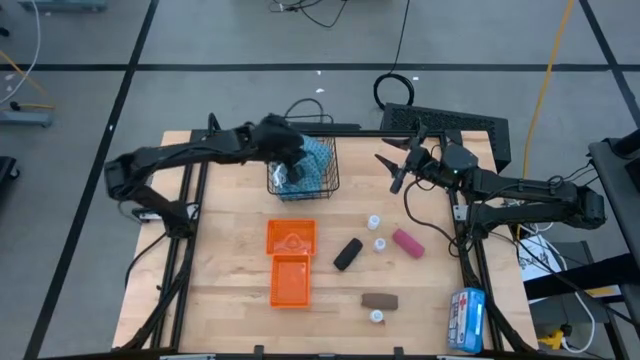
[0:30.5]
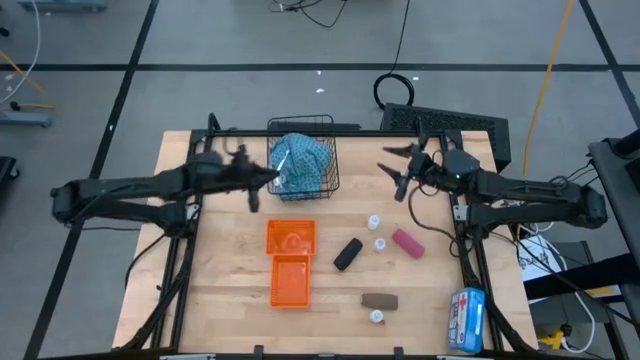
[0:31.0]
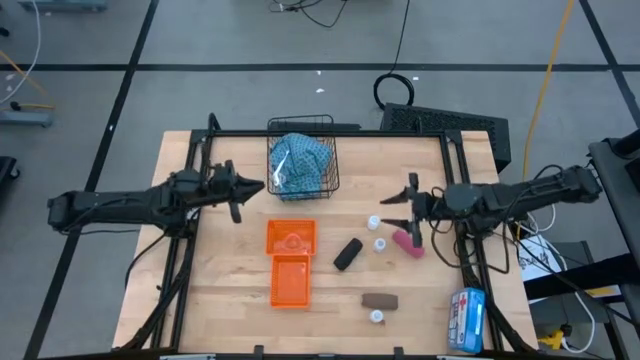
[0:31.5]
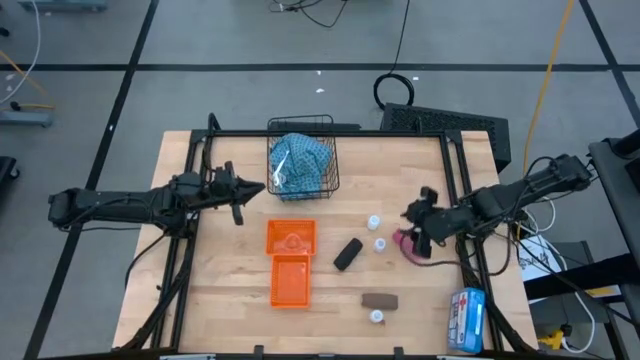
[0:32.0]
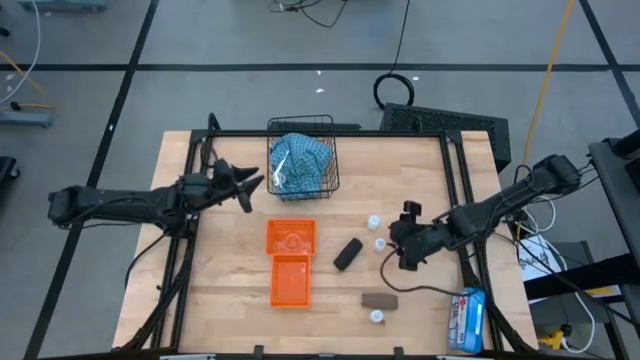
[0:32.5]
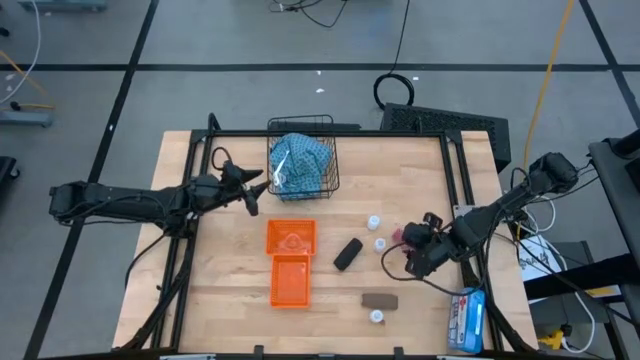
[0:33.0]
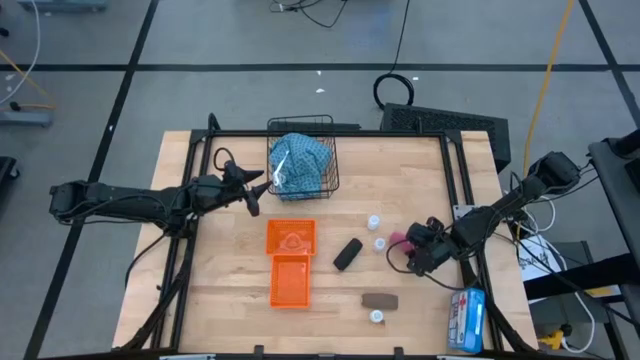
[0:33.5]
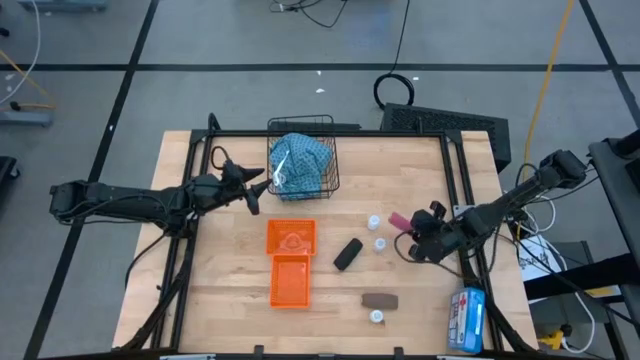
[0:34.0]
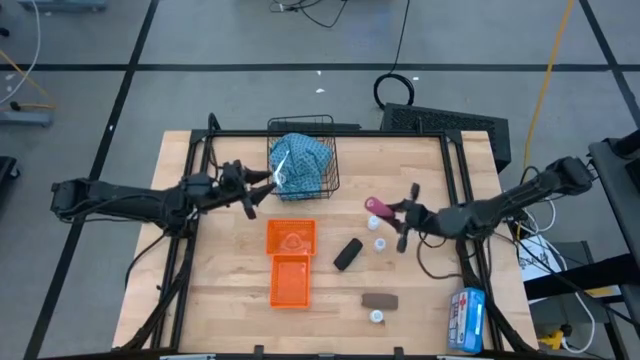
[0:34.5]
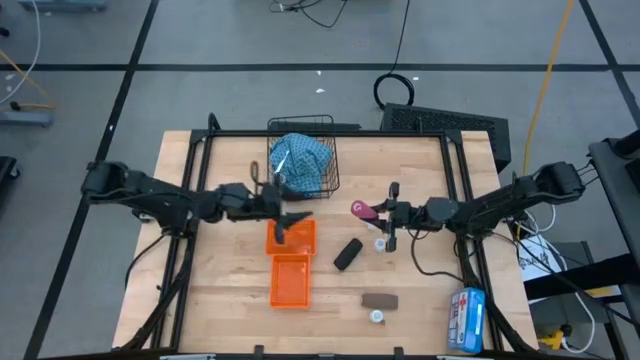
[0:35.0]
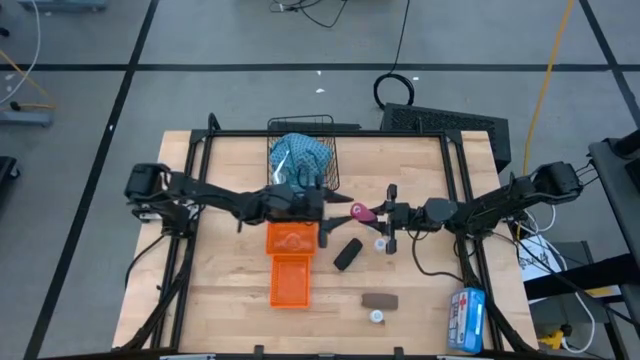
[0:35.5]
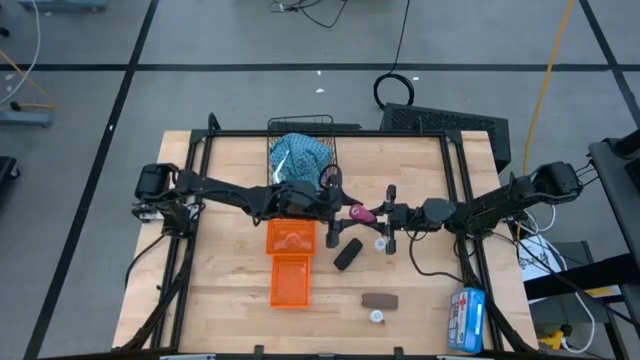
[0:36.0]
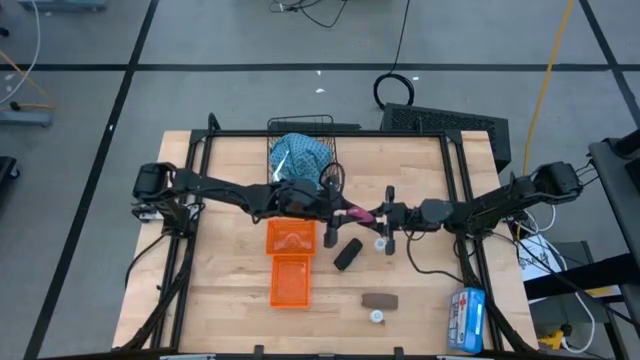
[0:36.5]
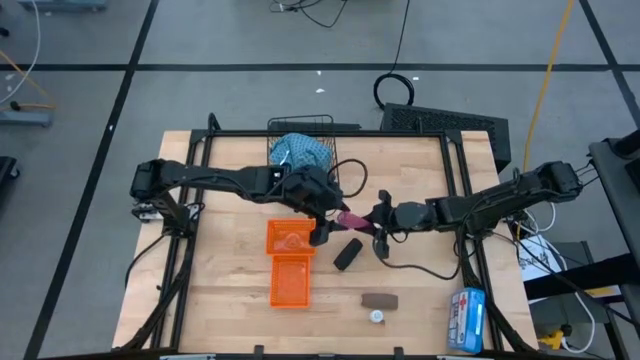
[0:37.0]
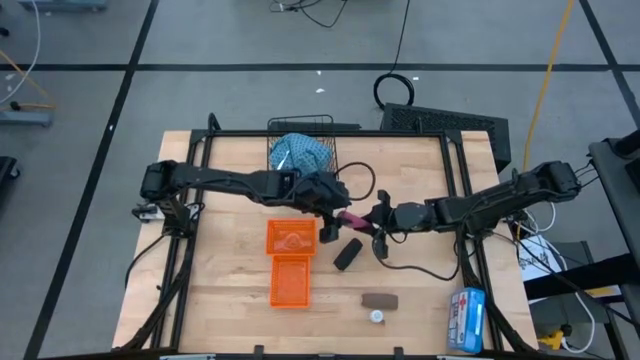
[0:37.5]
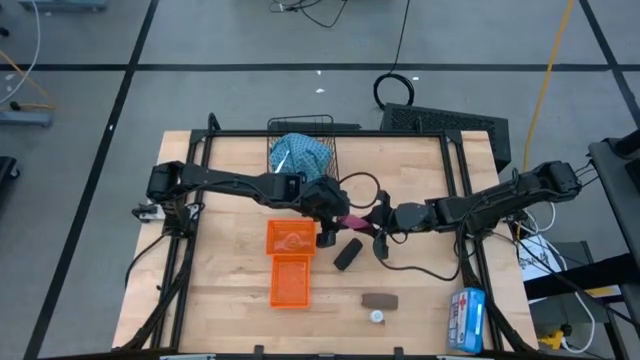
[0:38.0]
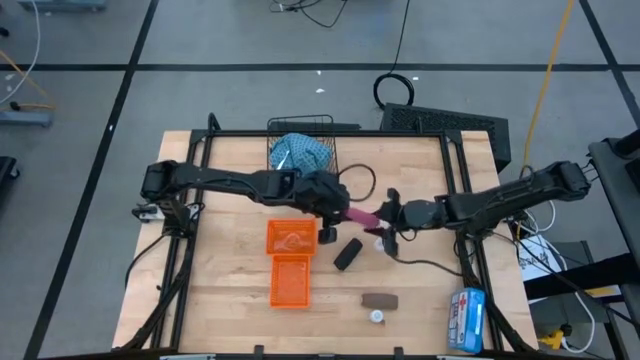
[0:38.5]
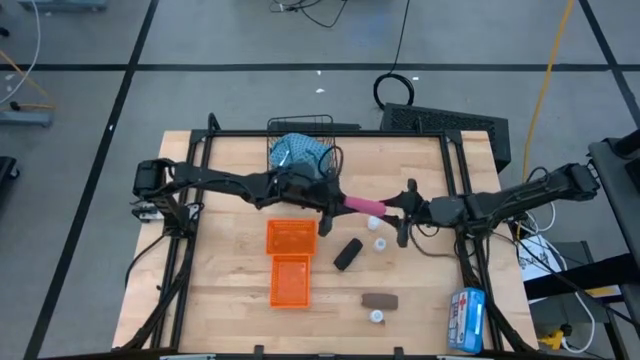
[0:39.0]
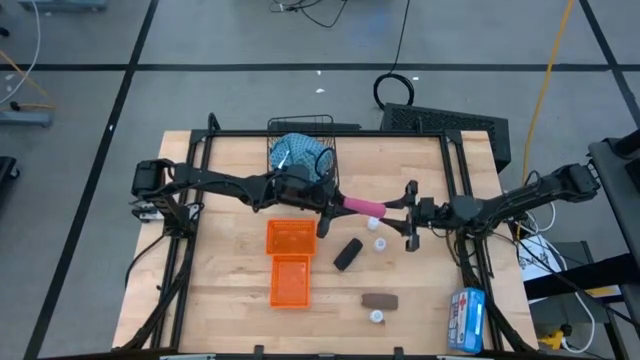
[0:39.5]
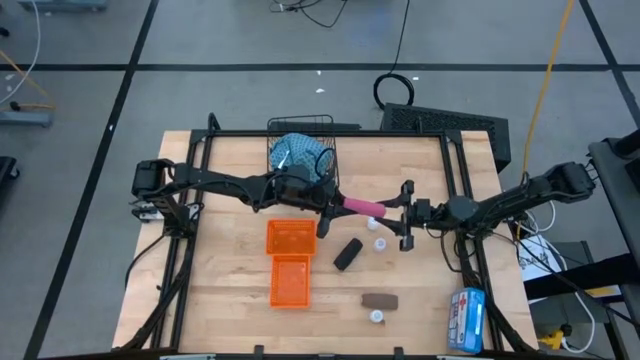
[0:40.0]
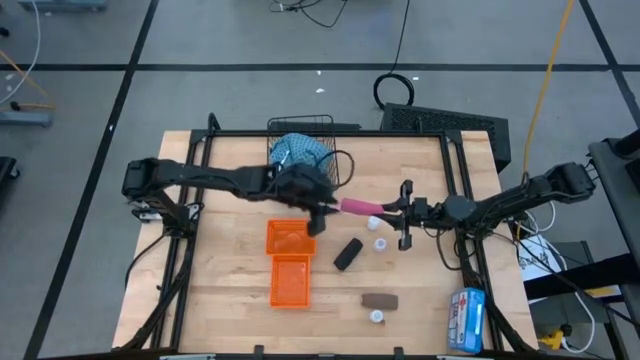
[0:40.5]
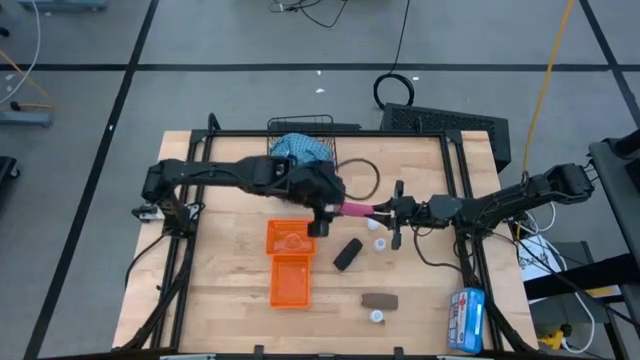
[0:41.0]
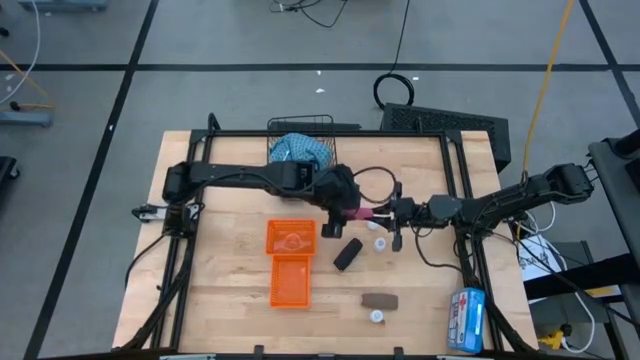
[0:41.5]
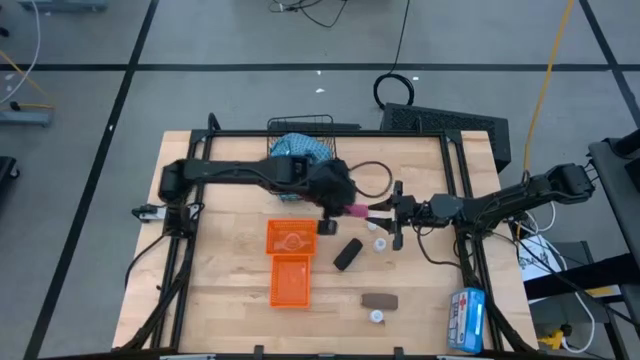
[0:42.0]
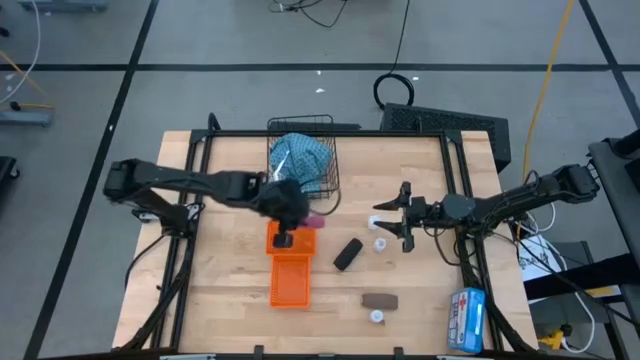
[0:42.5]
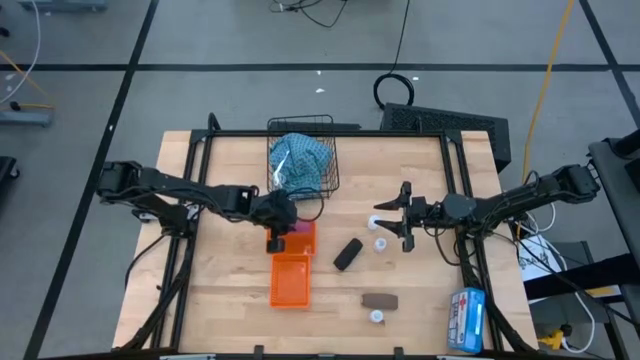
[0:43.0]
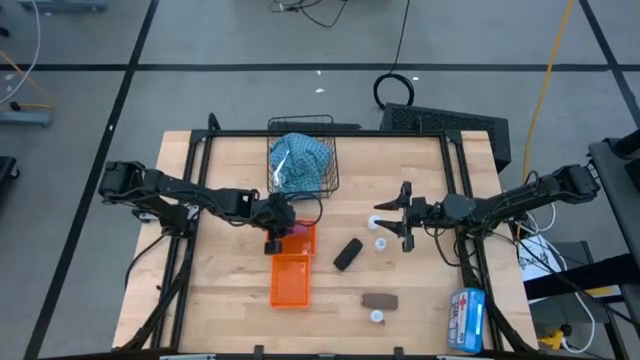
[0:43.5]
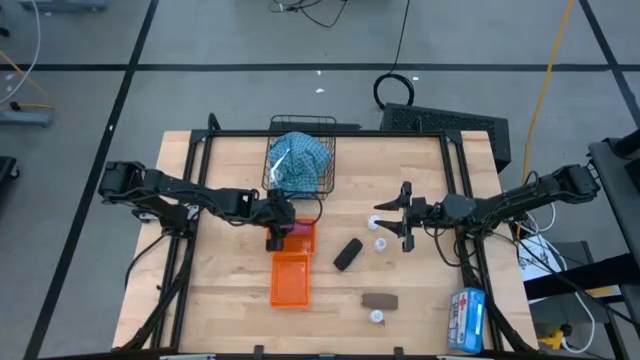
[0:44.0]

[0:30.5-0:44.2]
Task: Pick & Place Medicine items
Put the pink bandage into the top orange bin

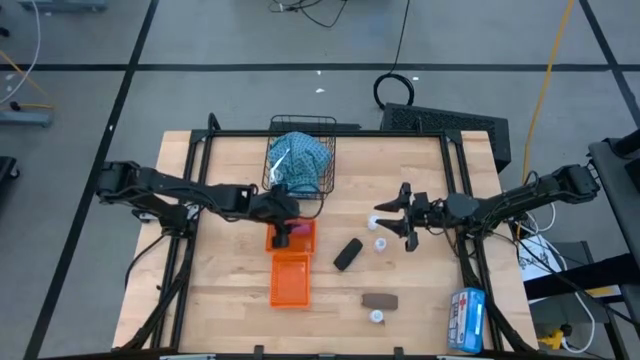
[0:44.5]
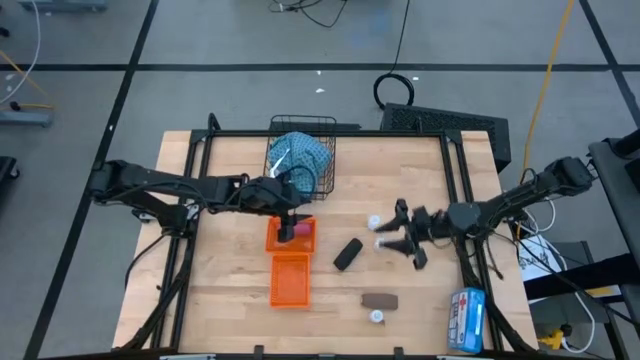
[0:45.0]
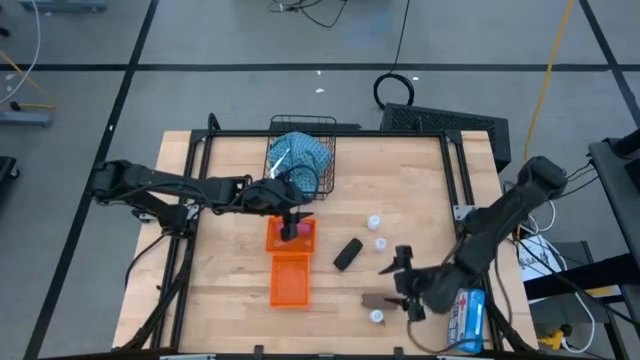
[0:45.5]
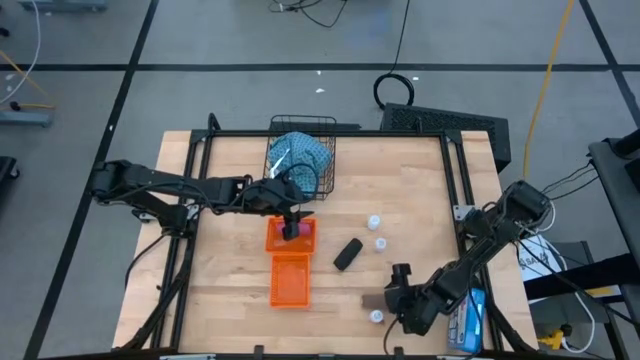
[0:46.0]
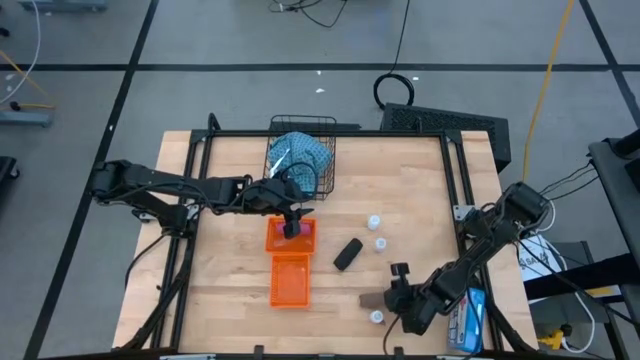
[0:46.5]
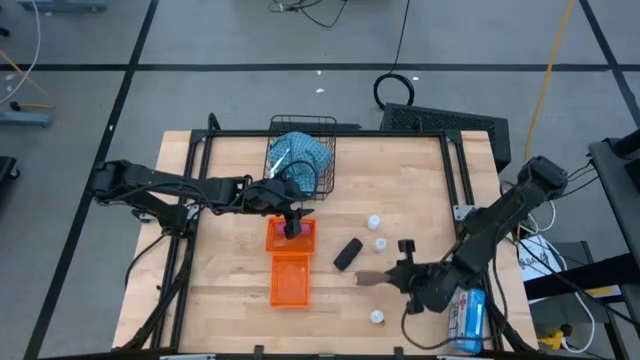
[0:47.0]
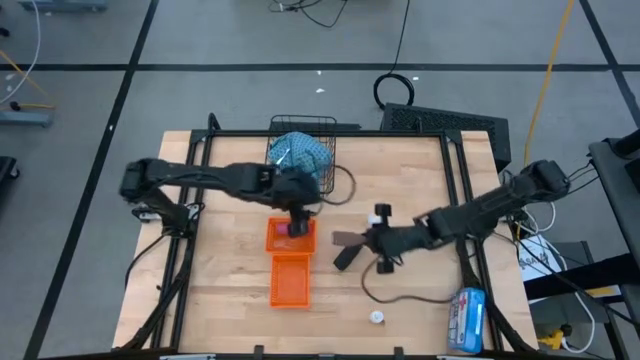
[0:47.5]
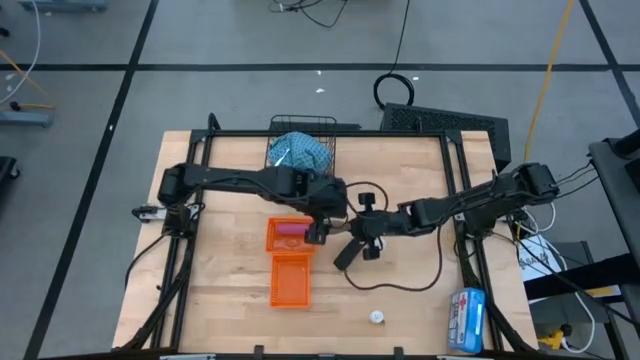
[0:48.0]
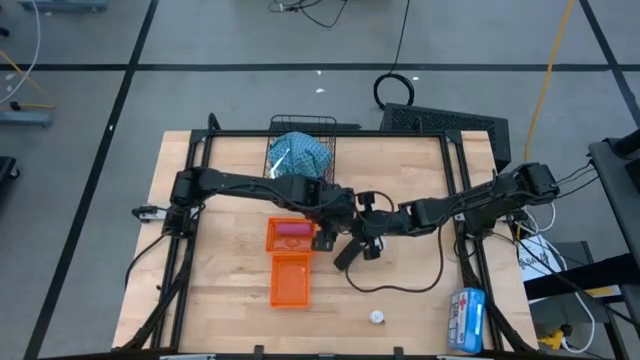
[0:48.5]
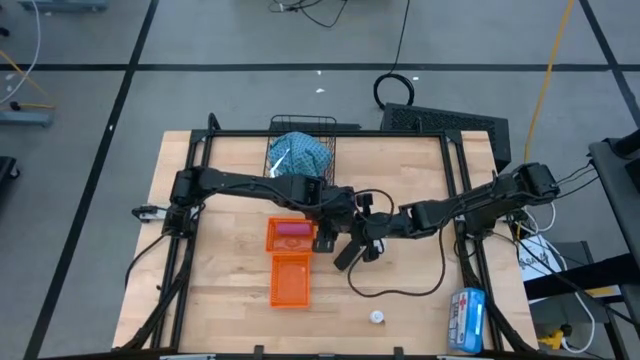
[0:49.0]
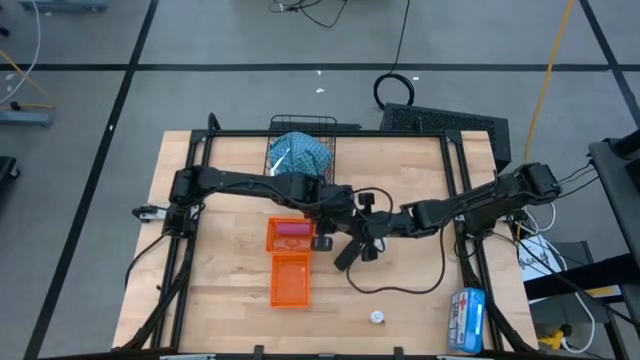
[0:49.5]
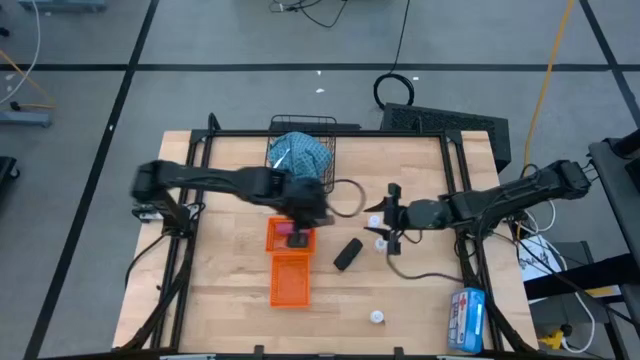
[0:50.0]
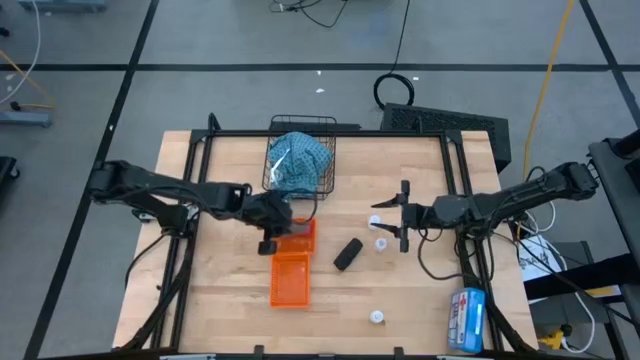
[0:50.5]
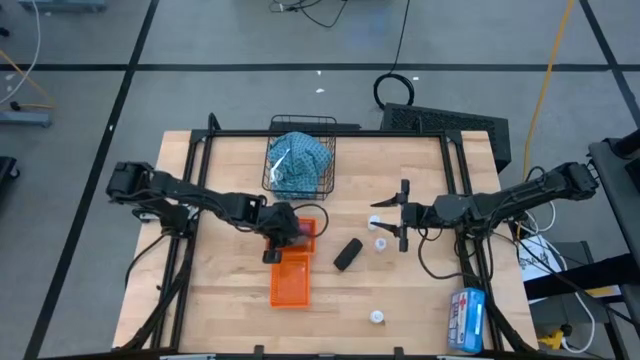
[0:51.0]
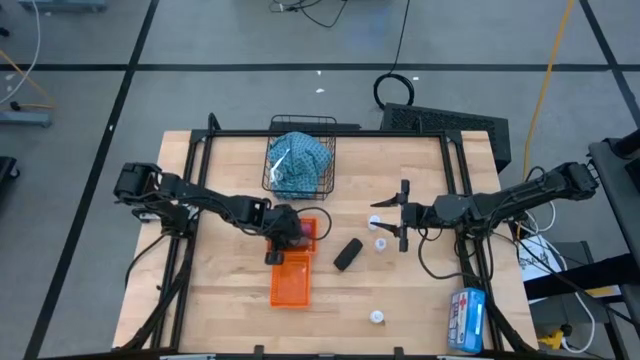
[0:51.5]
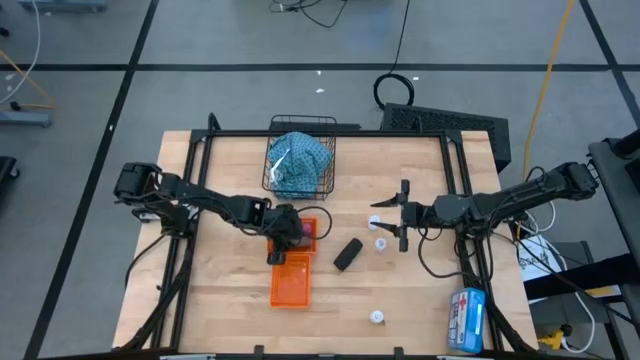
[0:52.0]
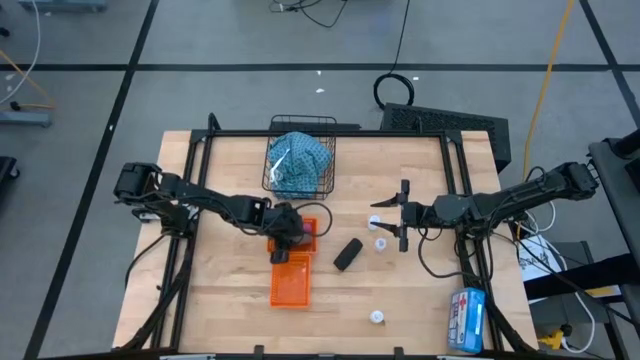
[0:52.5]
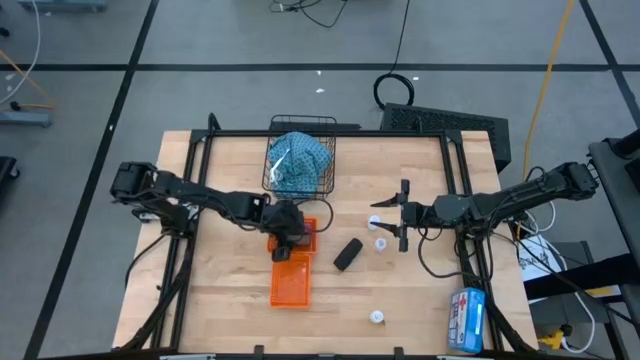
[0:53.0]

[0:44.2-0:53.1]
Put the brown bandage into the top orange bin
